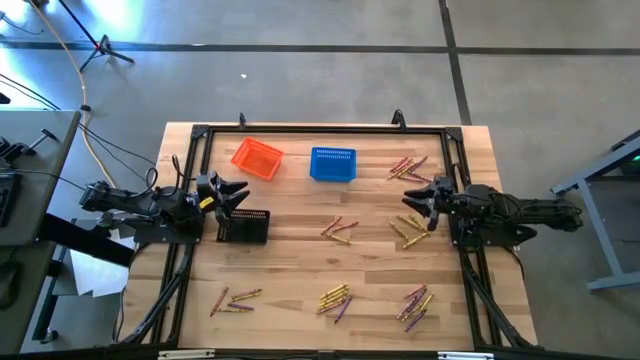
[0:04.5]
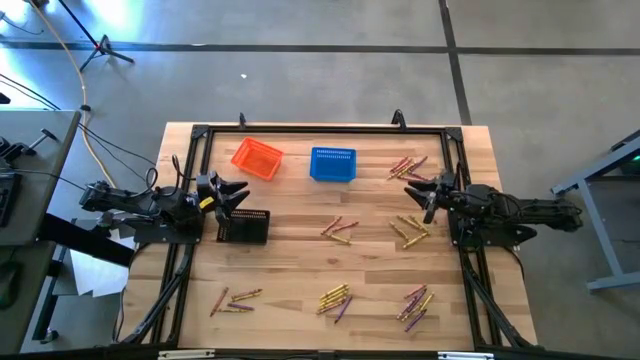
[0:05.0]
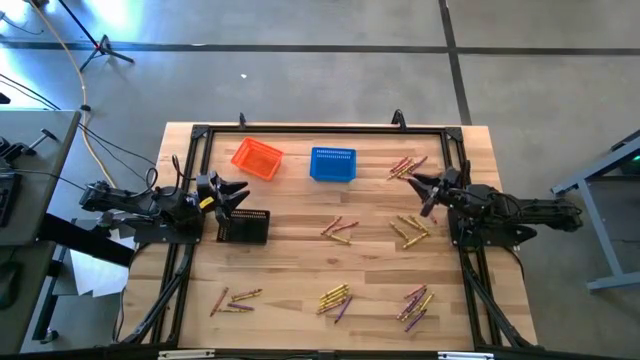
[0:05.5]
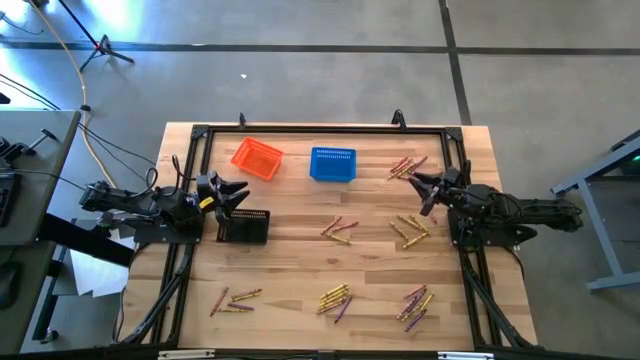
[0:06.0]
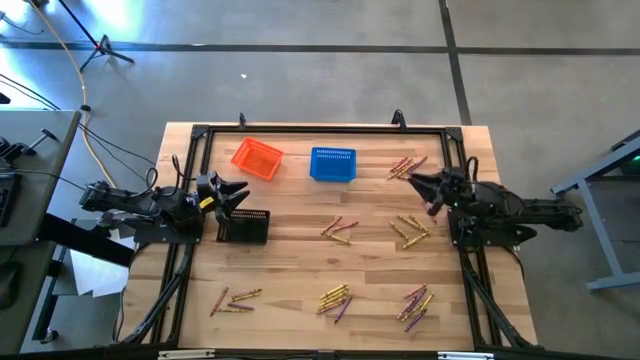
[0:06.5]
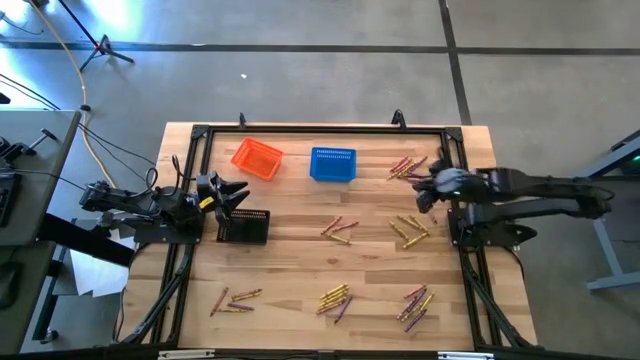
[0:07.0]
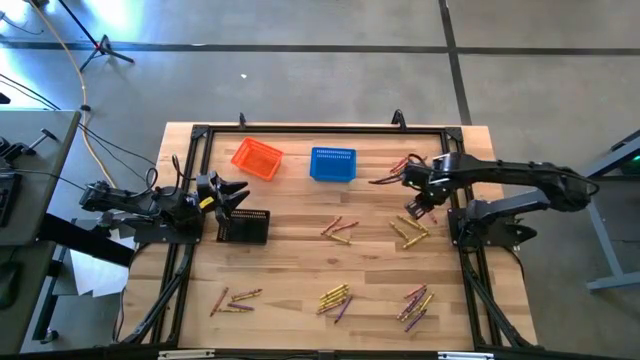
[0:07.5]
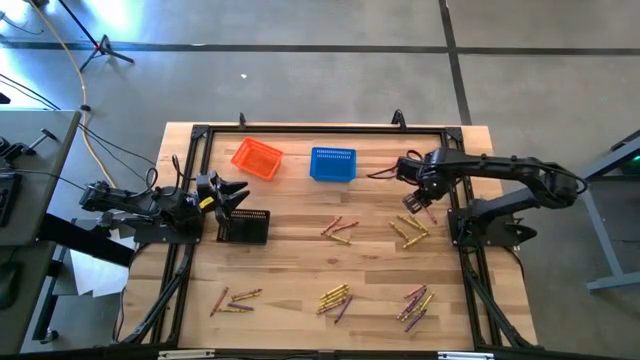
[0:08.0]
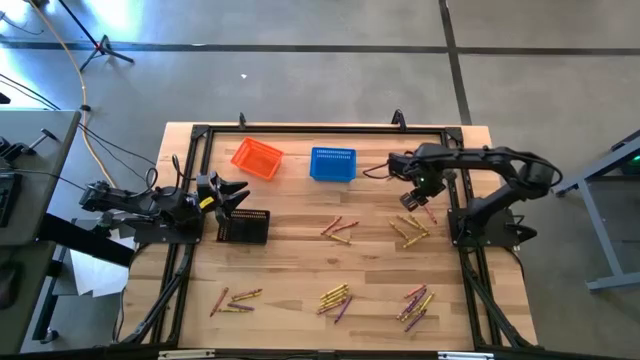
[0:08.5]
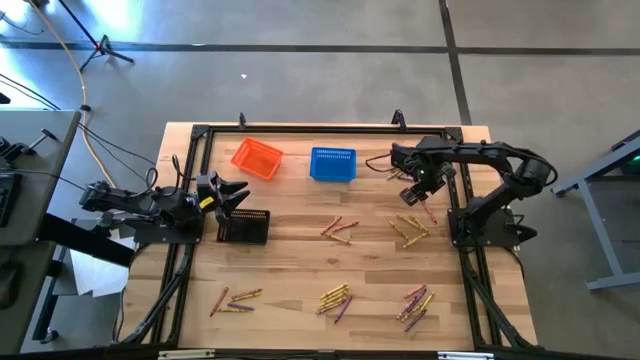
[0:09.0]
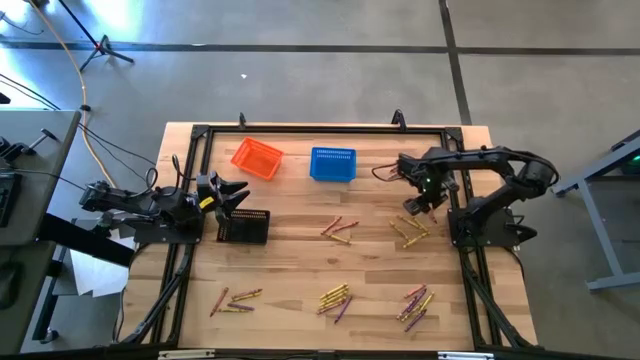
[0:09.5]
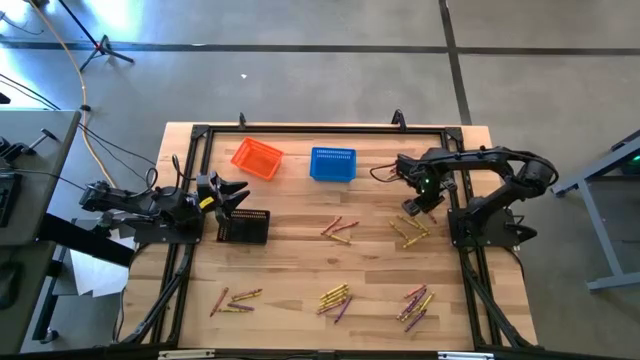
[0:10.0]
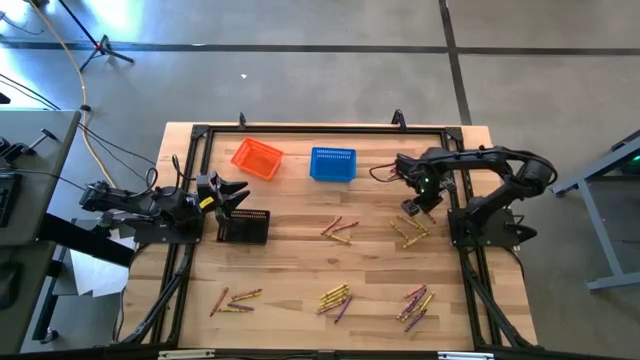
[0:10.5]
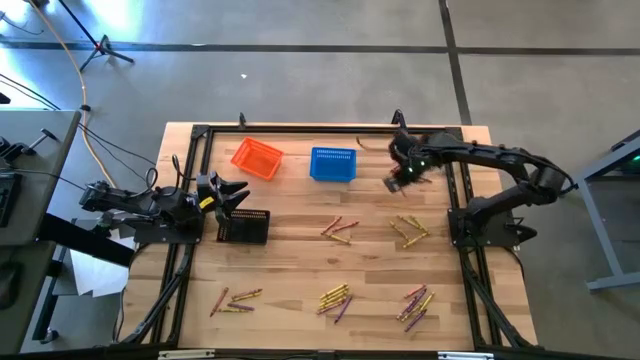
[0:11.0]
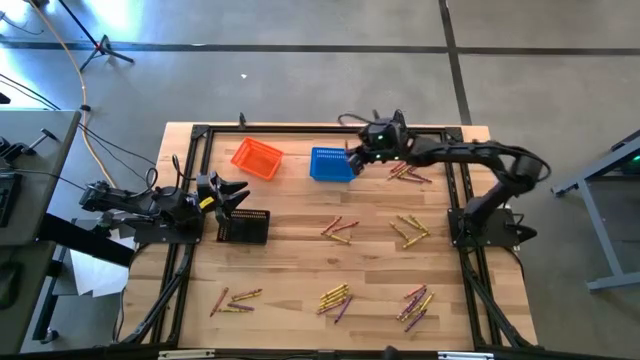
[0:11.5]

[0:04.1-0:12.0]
Task: Sort crayons
Put the red crayon into the blue bin

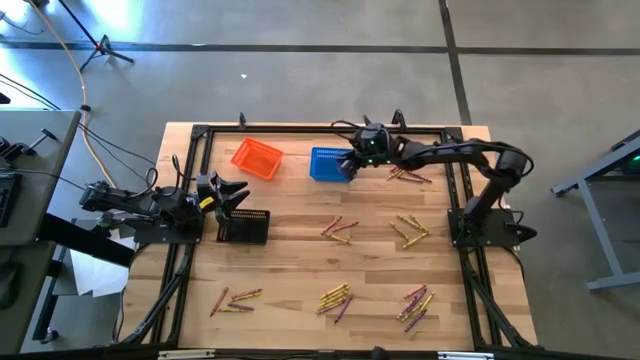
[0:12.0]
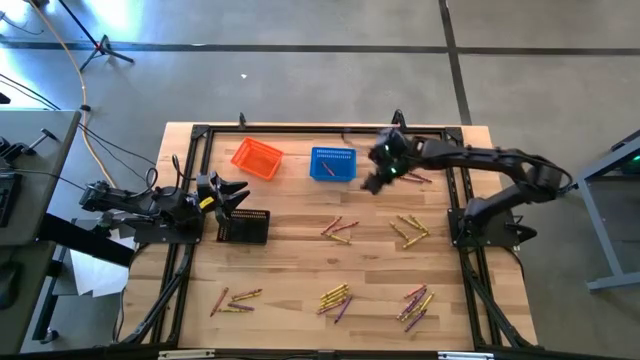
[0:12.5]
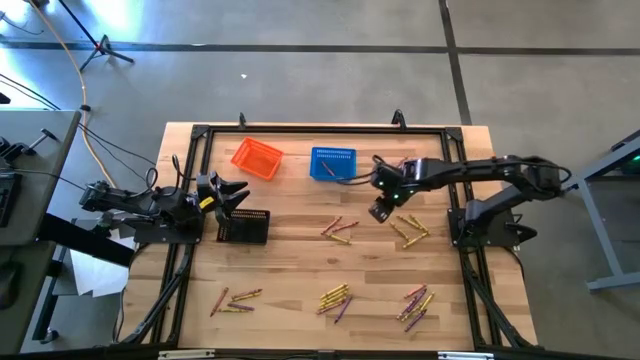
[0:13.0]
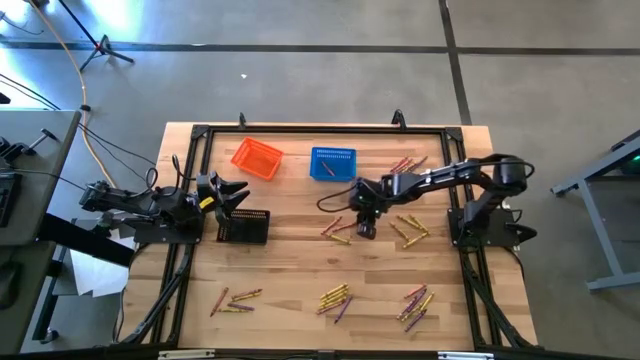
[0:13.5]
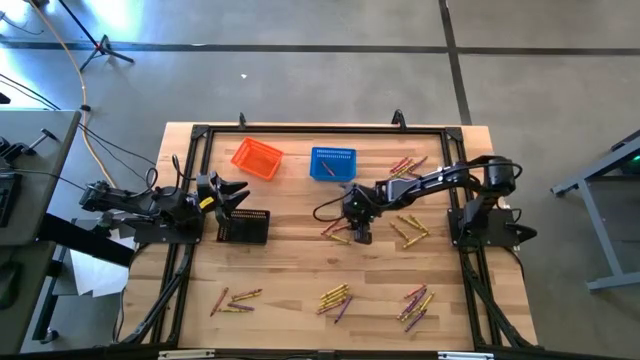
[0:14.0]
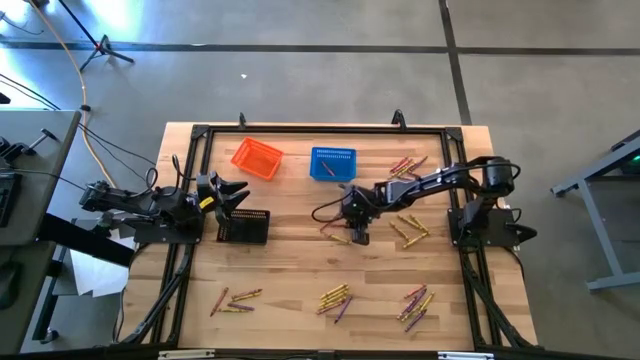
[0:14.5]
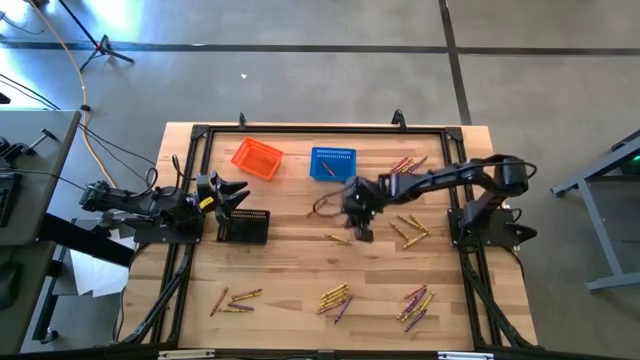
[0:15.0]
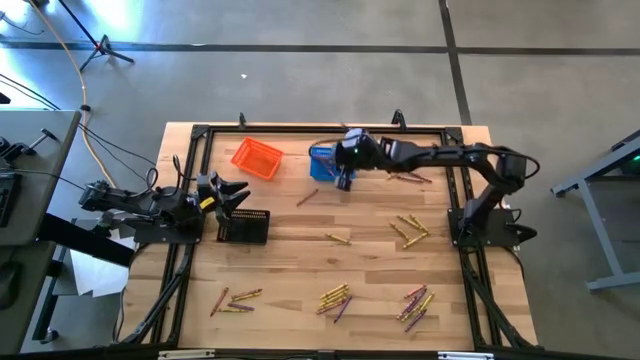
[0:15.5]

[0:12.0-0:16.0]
Put the red crayon into the blue bin

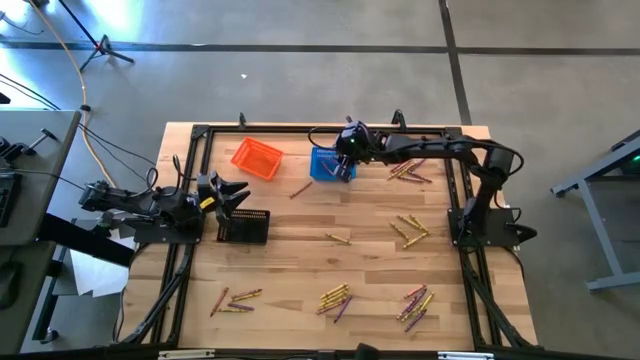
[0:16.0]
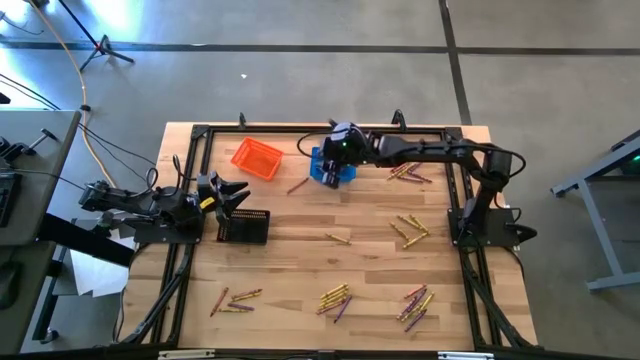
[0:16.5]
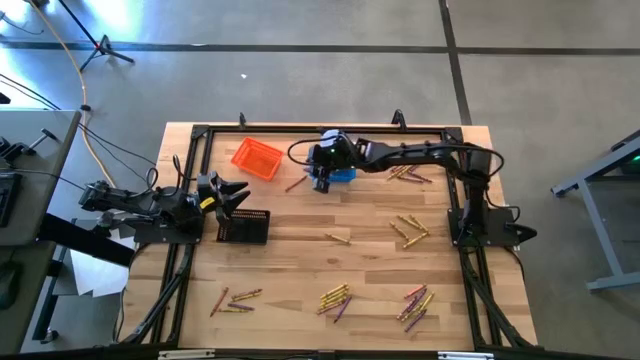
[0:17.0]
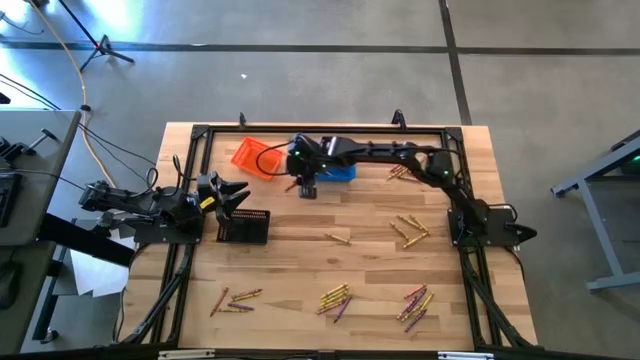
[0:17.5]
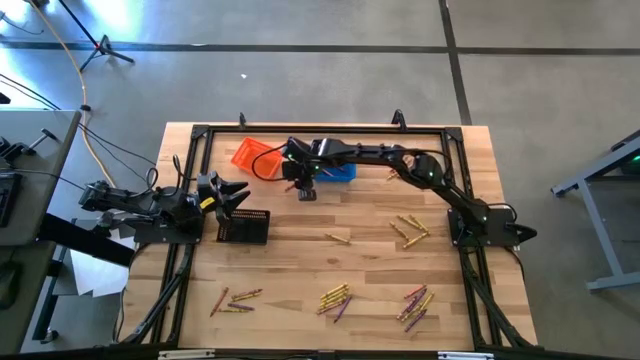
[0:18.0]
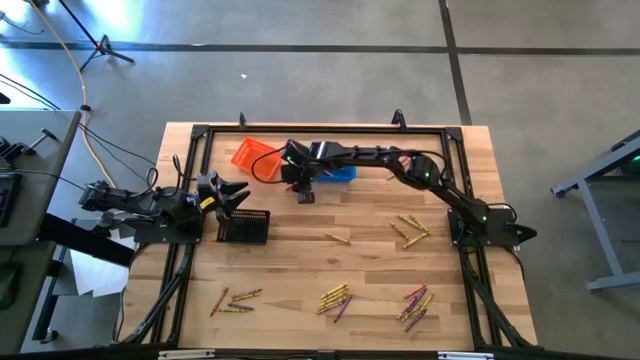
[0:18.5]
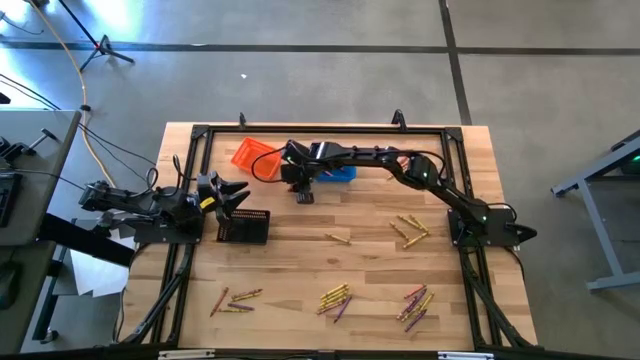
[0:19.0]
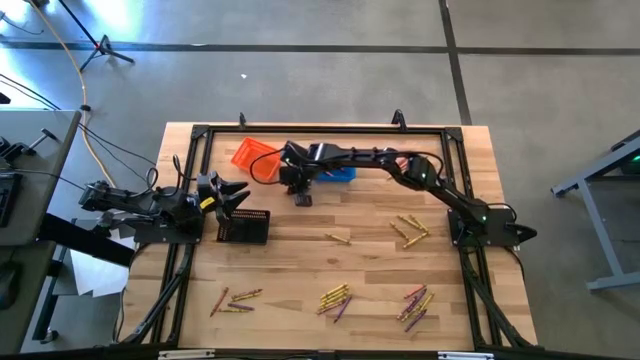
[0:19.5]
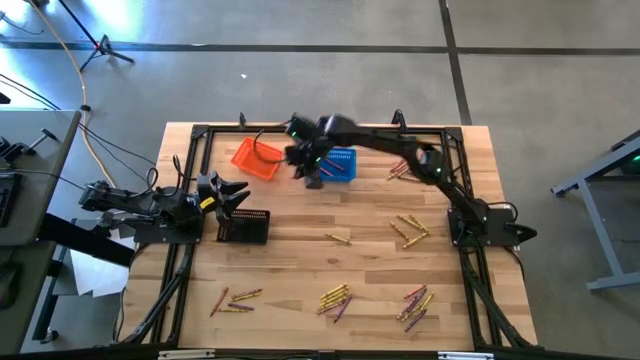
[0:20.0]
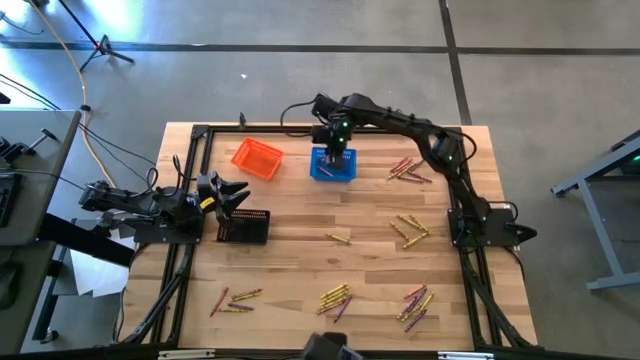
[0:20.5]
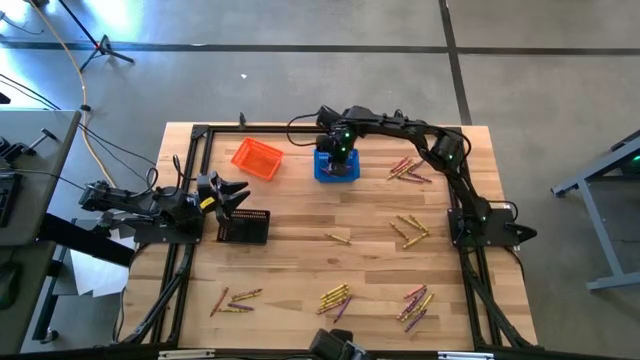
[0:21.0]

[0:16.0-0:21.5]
Put the red crayon into the blue bin

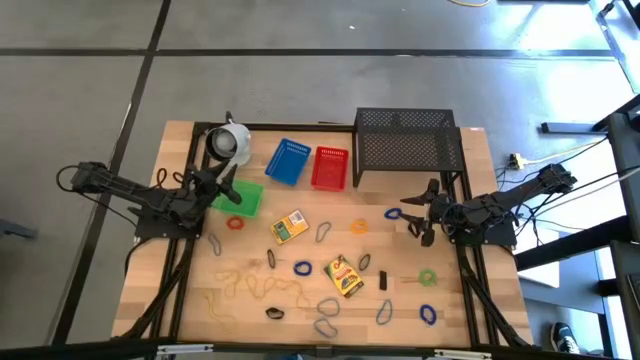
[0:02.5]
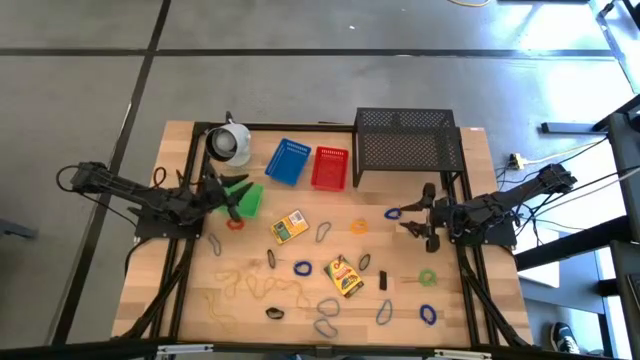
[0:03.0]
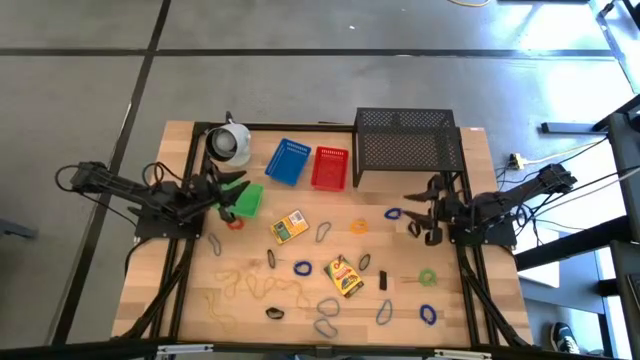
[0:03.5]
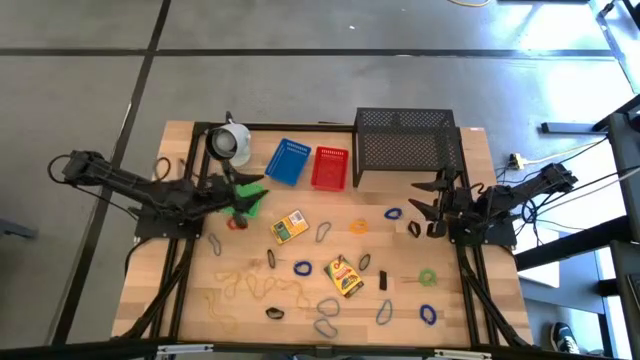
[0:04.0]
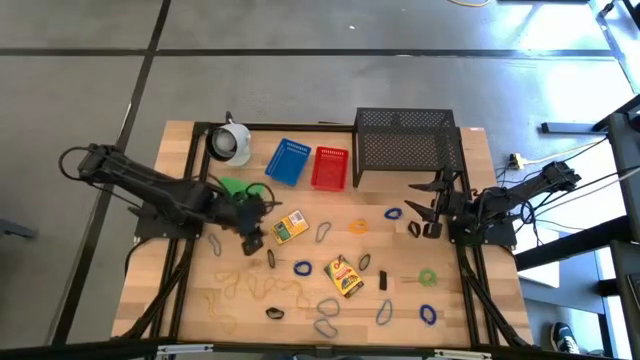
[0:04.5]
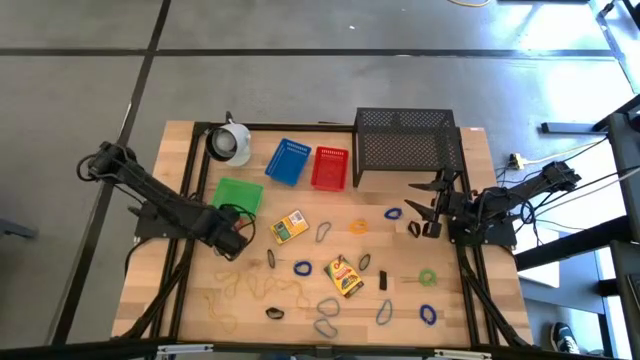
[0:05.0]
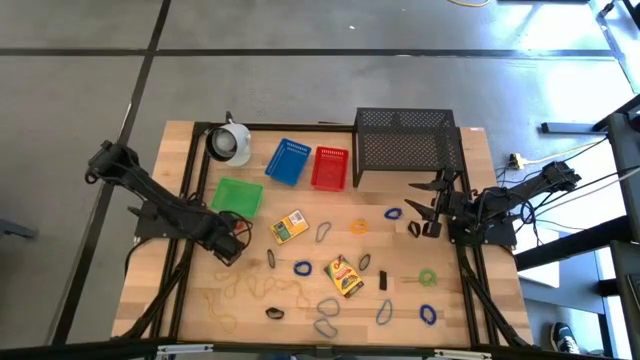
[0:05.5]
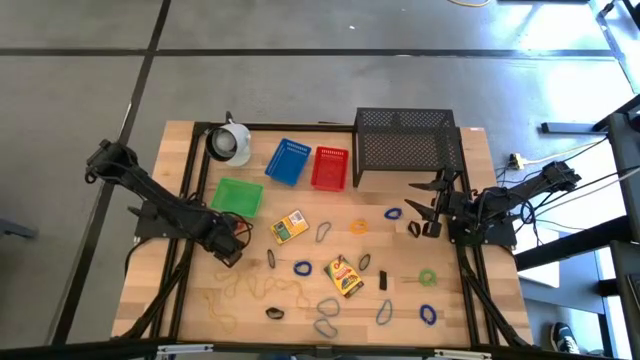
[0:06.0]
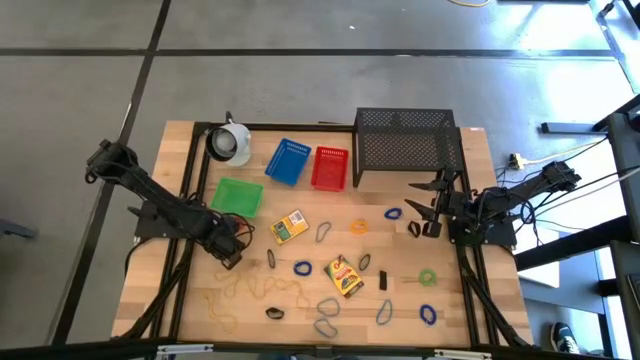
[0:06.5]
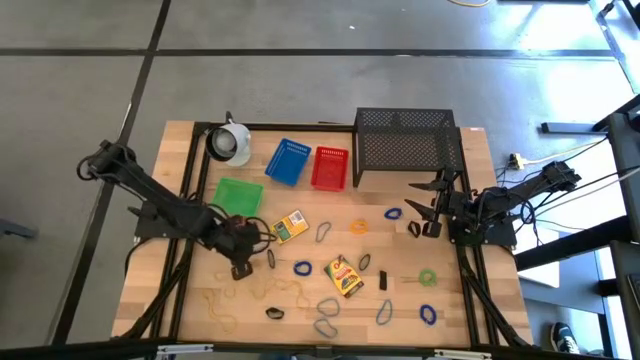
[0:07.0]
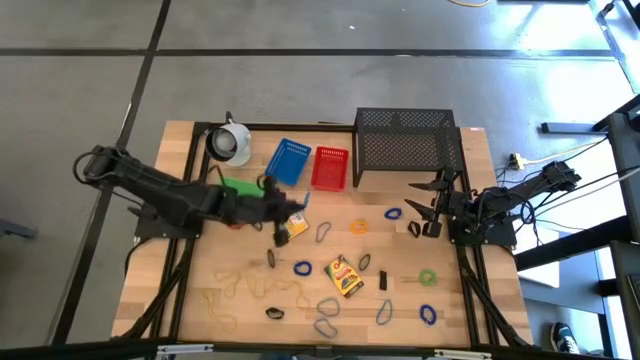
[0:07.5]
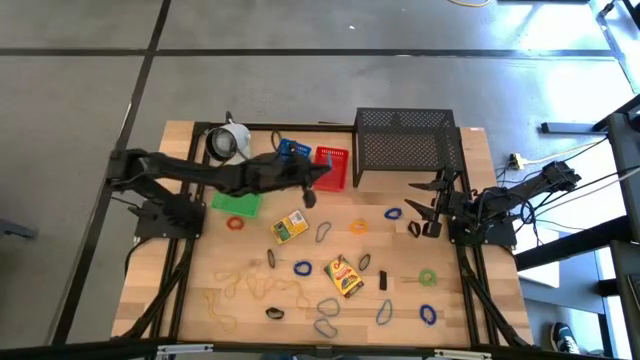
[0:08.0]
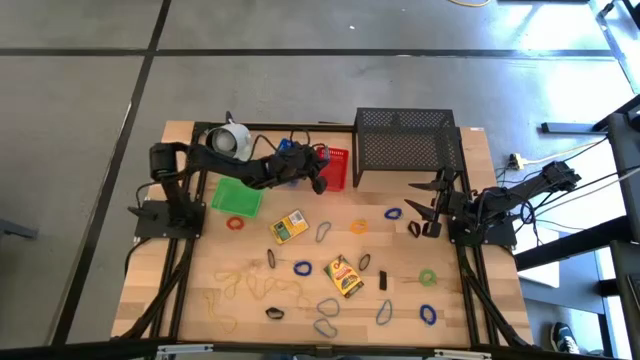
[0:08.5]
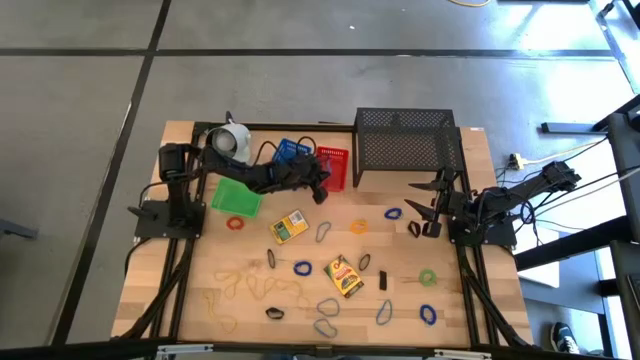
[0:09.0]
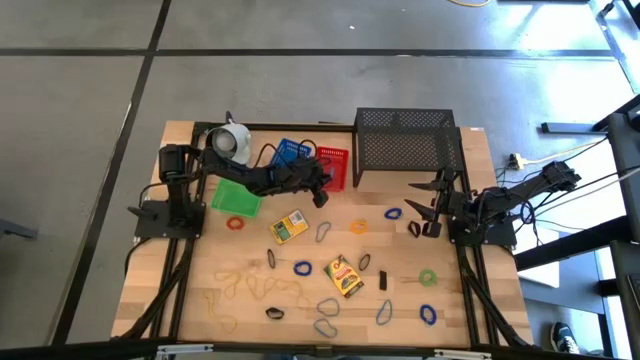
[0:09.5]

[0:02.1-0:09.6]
Task: Pick & Place Office Desk Supplies
Put the blue rubber band into the red bin
